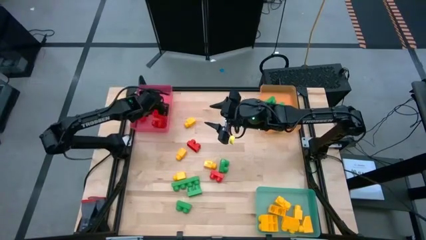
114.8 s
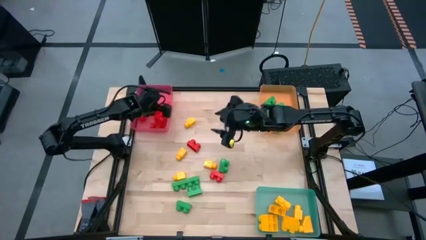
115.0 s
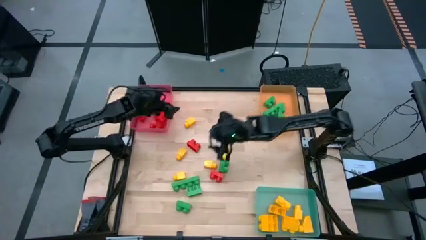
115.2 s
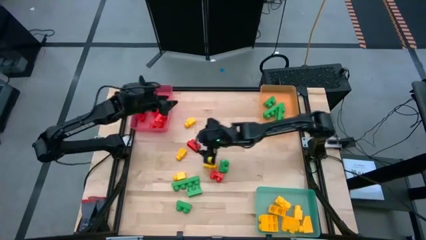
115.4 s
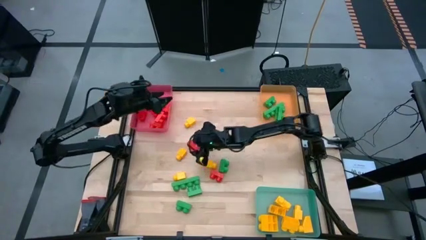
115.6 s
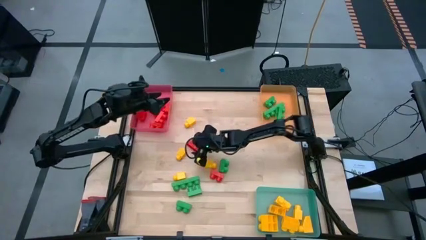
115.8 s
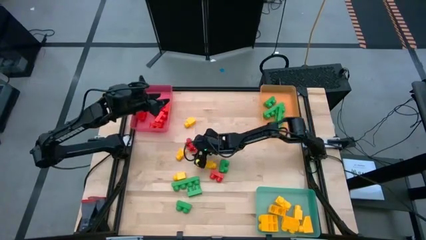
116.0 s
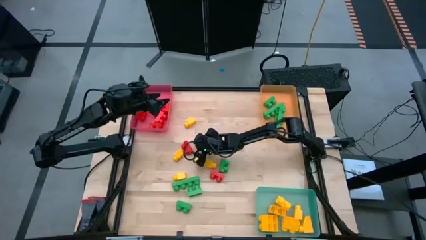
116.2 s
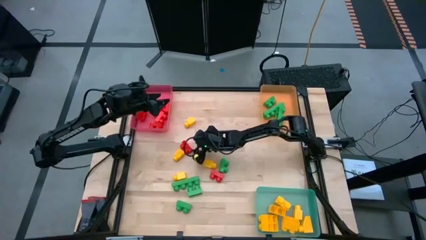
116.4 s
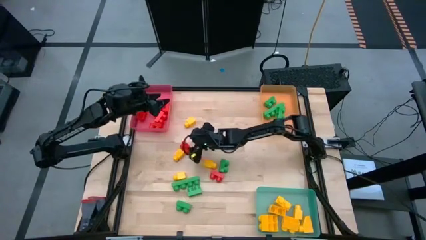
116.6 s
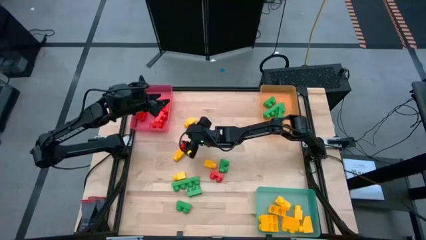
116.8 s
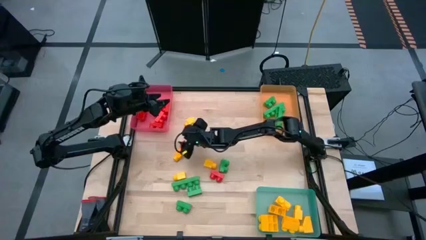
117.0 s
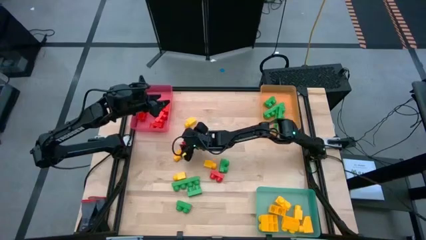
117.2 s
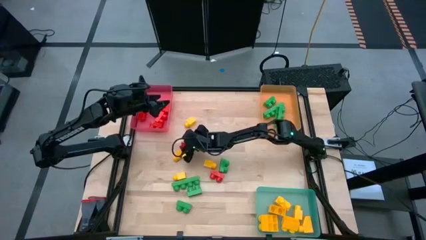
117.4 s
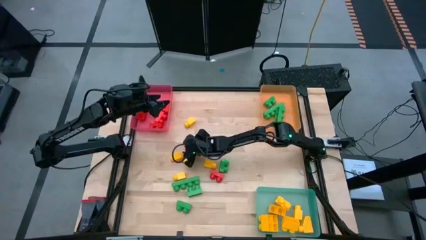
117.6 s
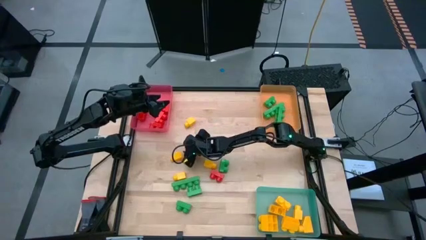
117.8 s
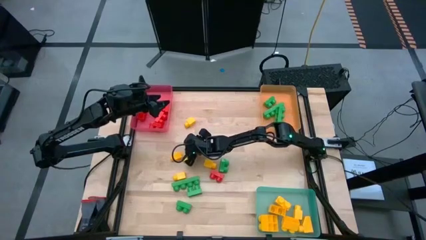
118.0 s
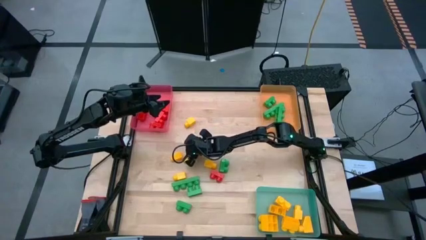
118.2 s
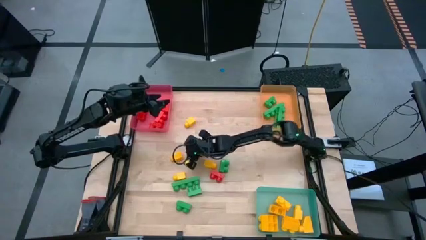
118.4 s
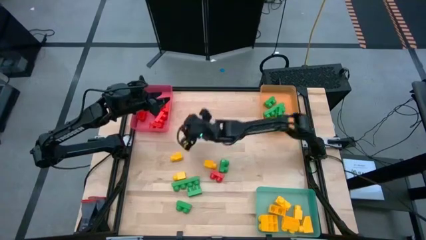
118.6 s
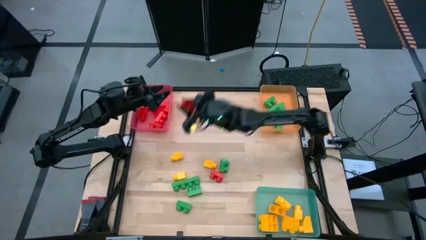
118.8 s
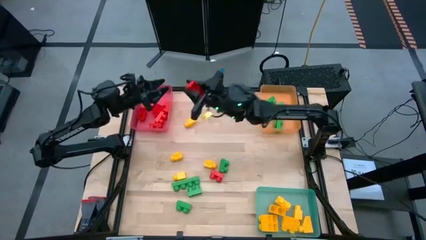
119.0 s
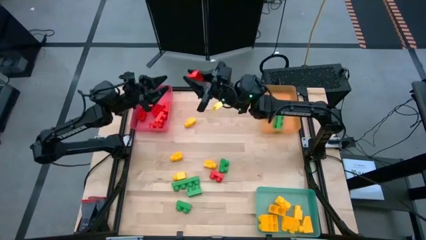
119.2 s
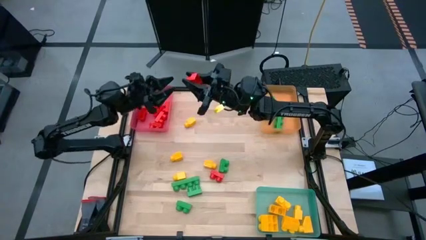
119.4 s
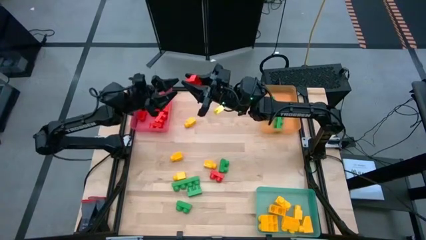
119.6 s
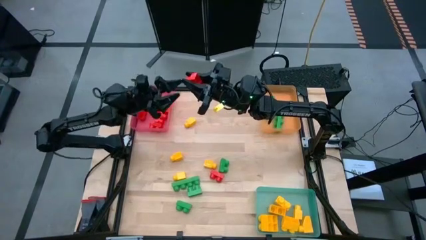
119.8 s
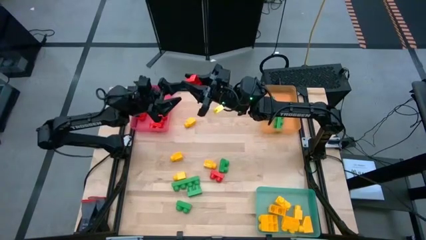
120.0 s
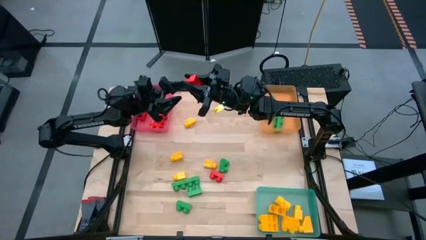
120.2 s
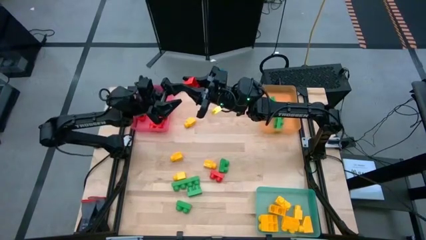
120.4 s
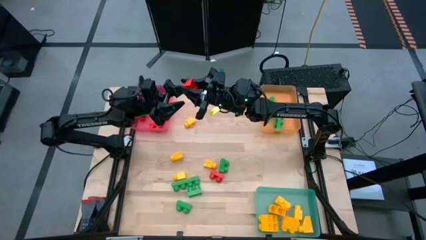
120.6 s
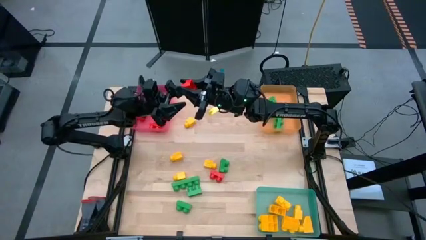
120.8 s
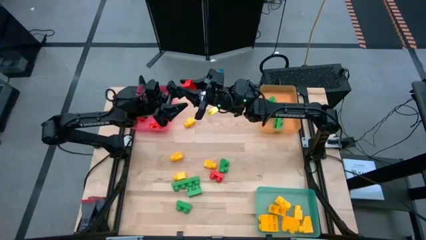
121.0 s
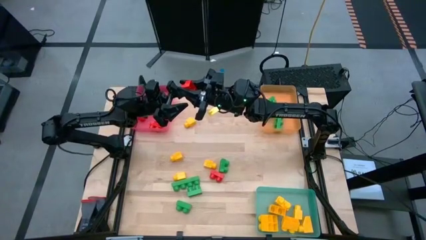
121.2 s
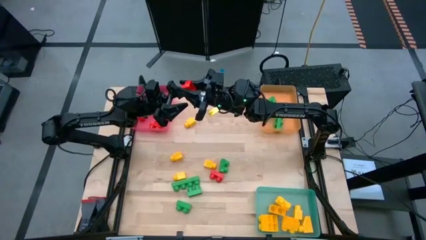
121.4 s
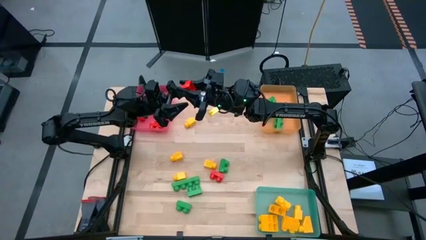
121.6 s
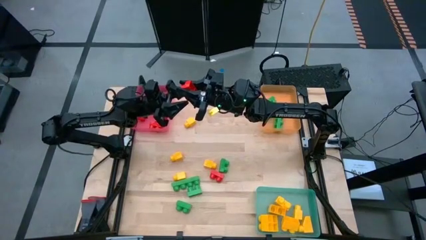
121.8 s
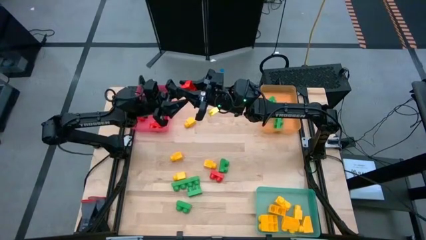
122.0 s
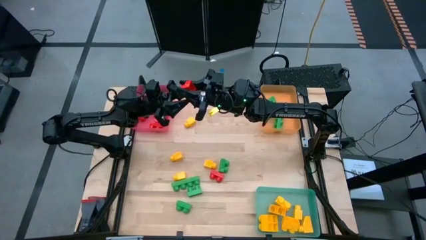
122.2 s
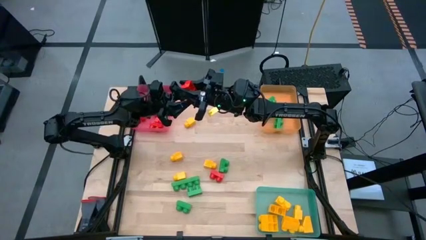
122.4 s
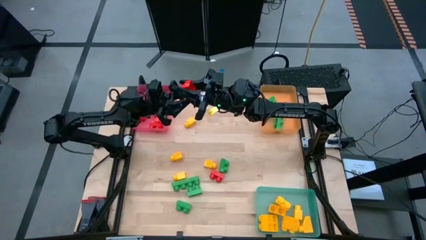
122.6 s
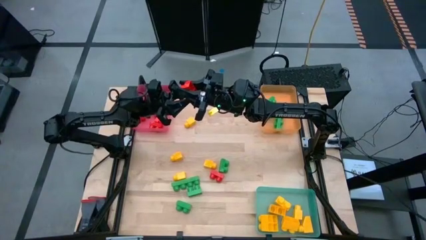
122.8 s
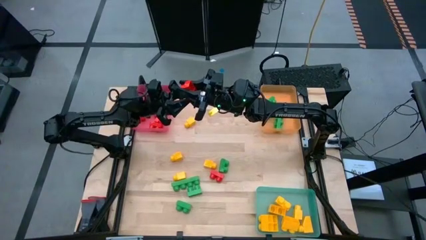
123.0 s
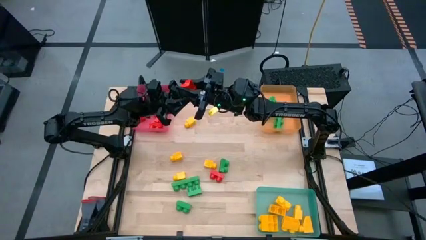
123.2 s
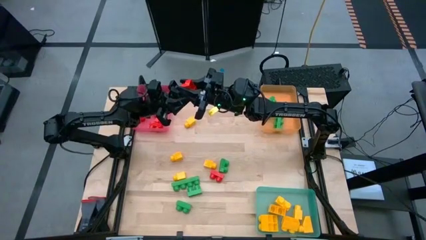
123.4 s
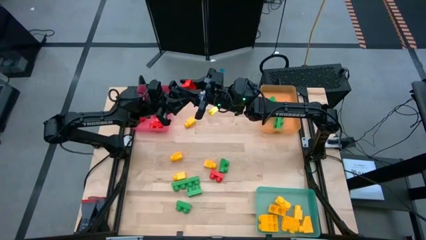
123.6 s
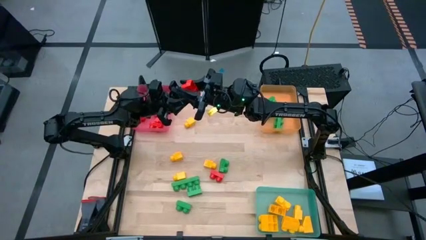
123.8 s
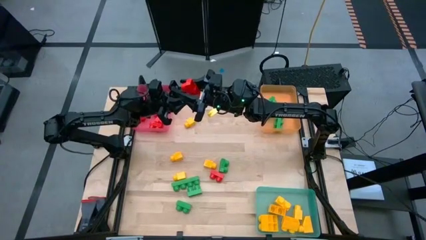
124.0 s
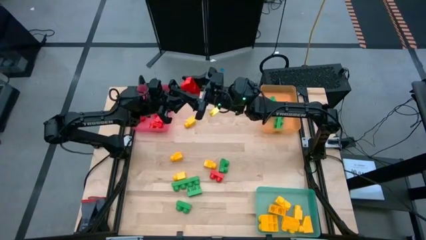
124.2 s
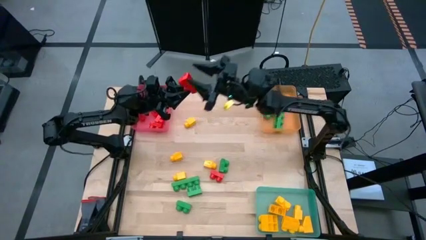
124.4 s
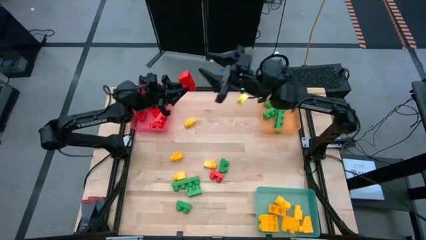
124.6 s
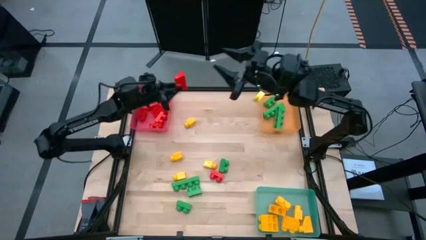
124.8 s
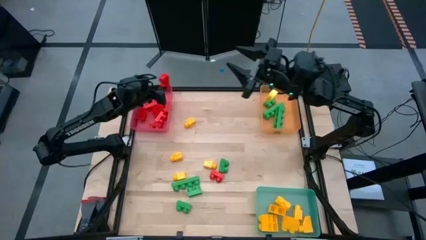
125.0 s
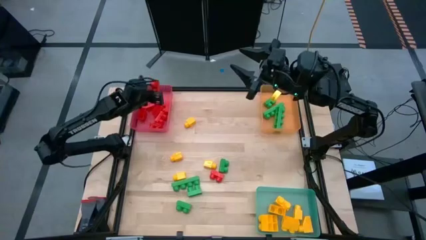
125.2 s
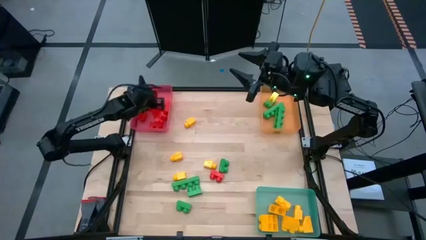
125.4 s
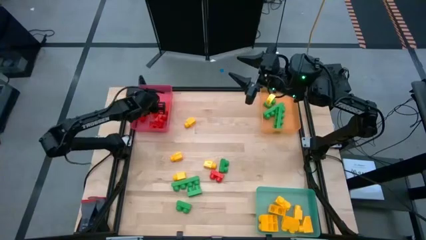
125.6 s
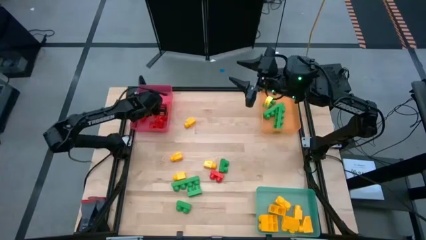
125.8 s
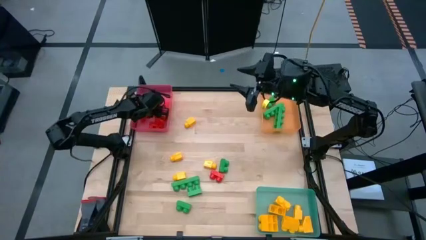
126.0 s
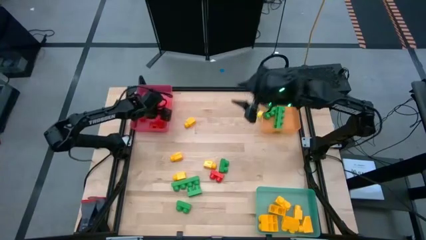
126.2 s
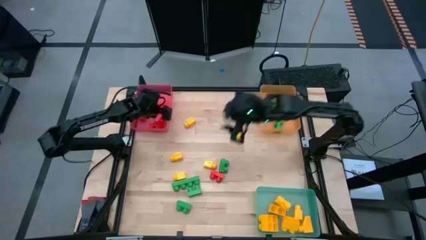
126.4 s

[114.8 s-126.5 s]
Task: Sort blocks
Put the red game piece into the red bin

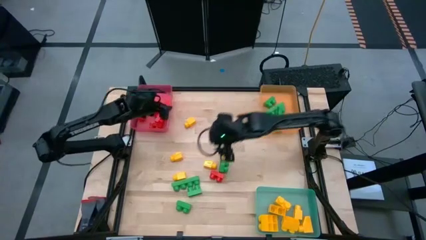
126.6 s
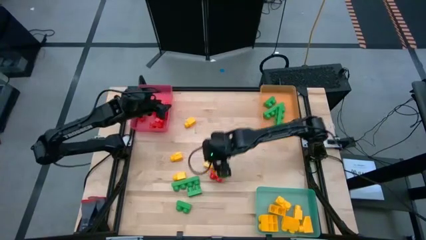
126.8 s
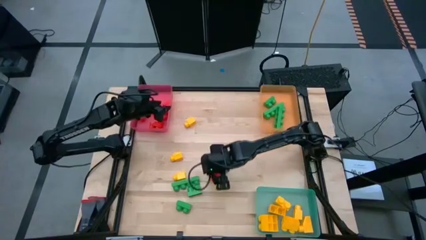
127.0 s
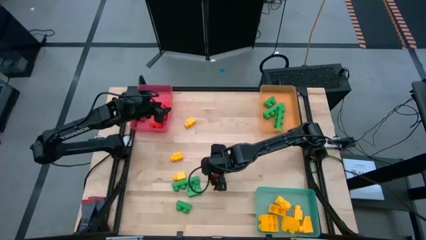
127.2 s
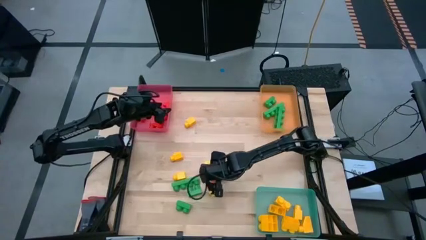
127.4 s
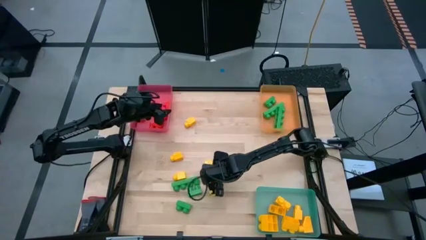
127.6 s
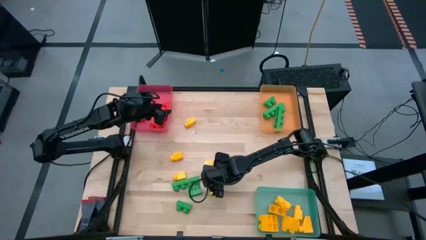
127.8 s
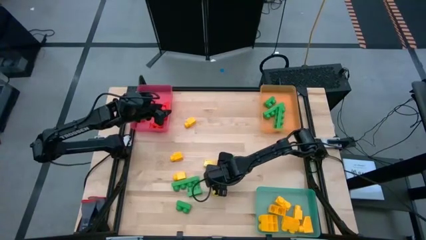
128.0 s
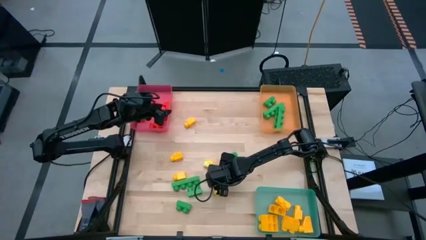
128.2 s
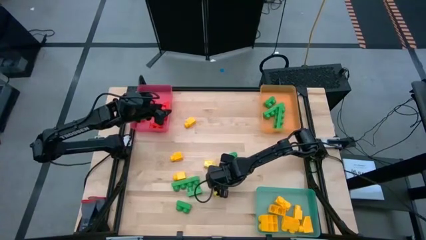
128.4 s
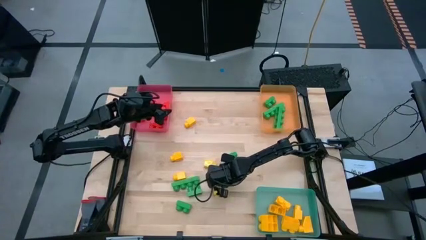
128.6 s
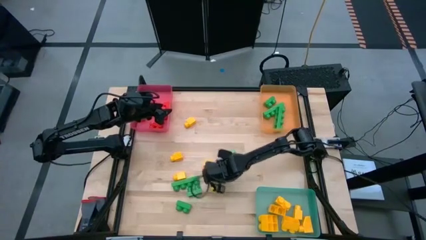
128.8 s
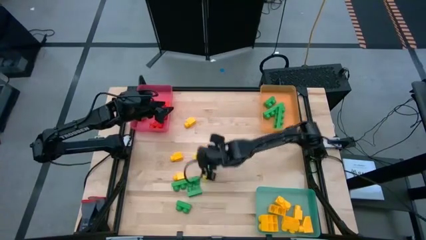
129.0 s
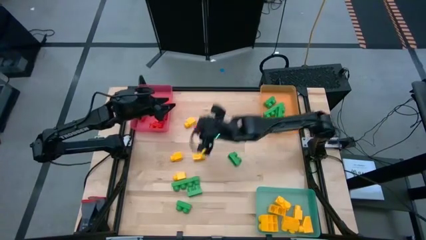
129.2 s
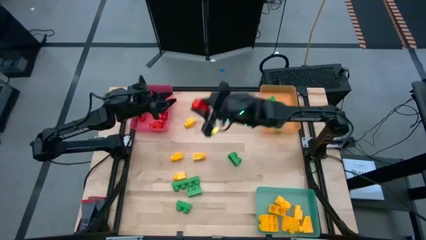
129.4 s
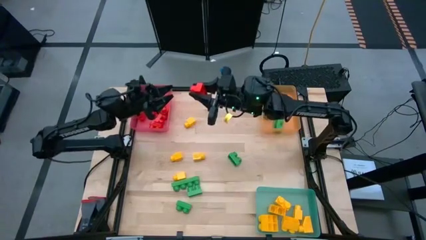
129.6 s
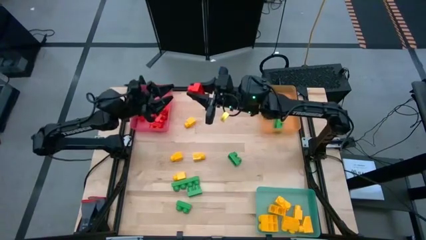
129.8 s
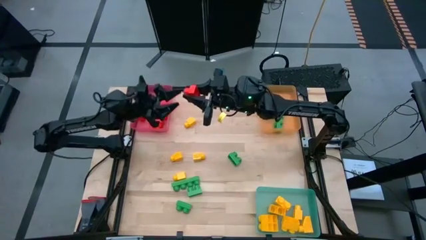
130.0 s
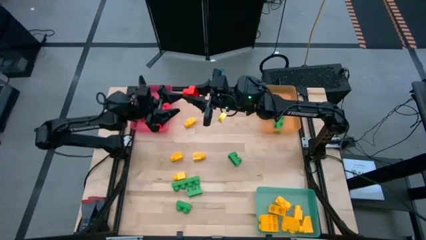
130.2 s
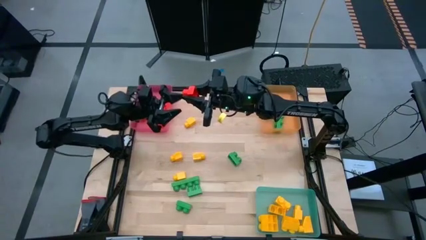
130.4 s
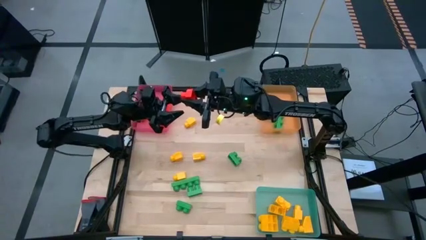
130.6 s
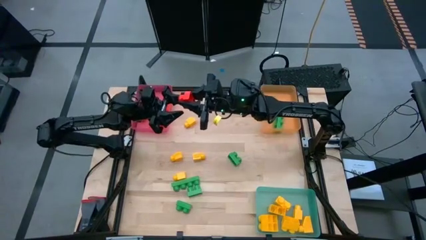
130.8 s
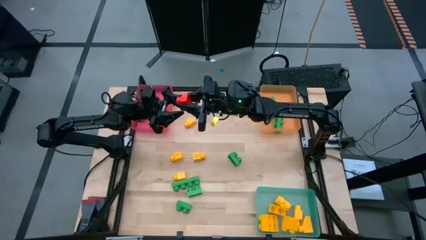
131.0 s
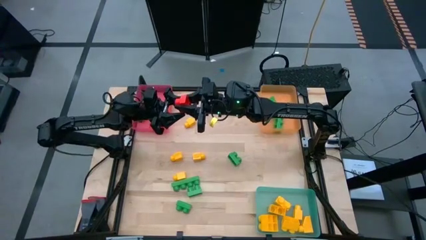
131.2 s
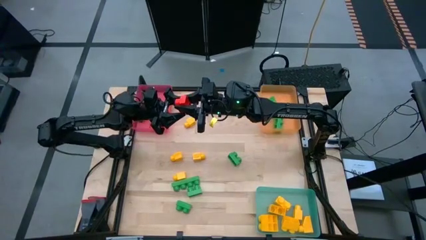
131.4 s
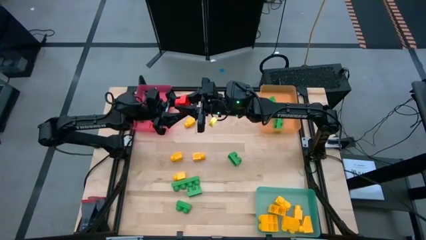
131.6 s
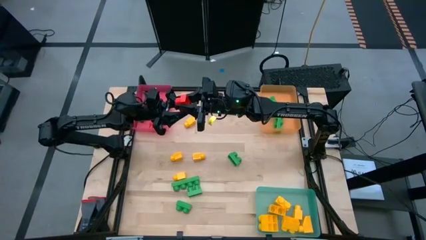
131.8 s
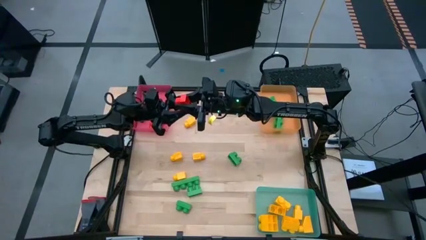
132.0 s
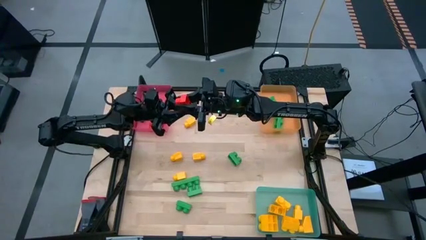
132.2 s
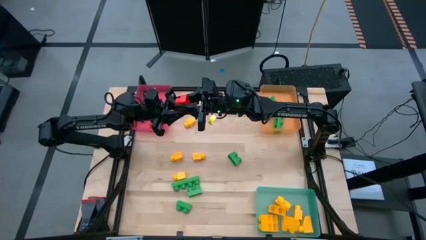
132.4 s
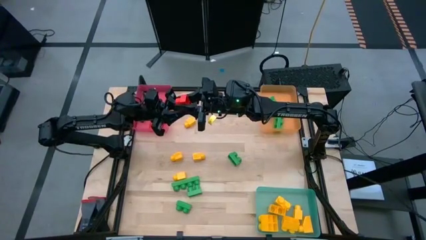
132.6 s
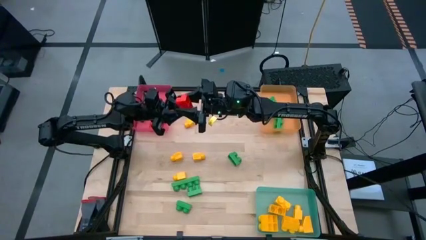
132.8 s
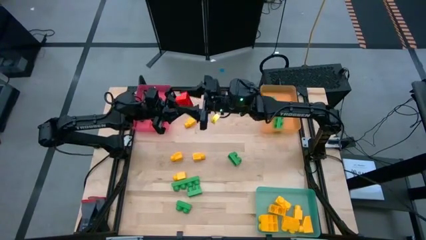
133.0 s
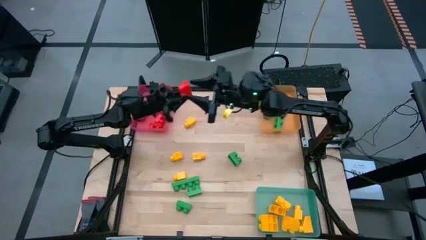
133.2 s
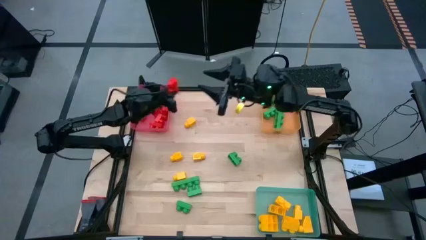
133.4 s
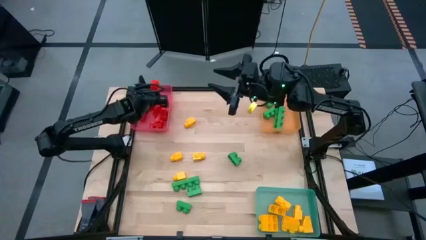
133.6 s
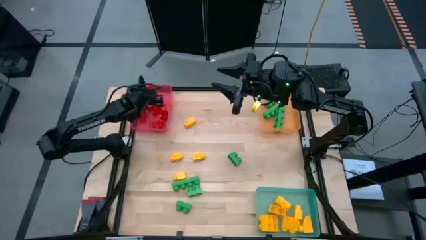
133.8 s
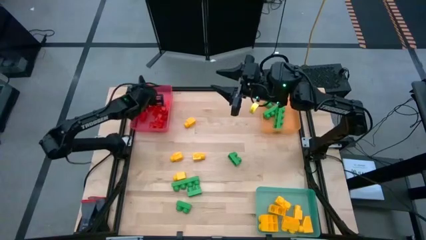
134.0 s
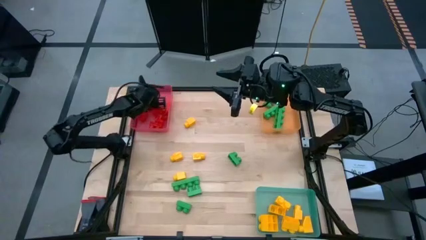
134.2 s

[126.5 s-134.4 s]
Put the red game piece into the red bin
